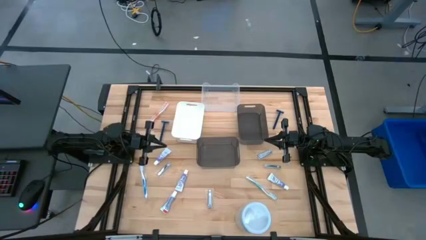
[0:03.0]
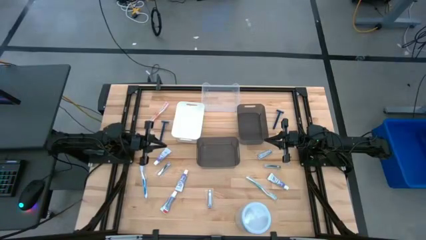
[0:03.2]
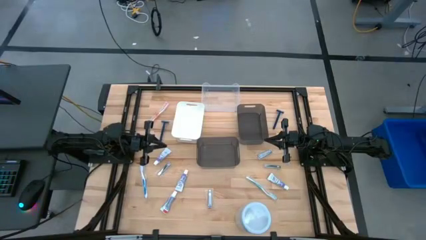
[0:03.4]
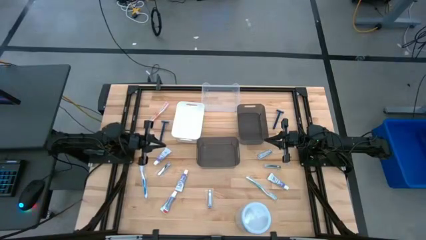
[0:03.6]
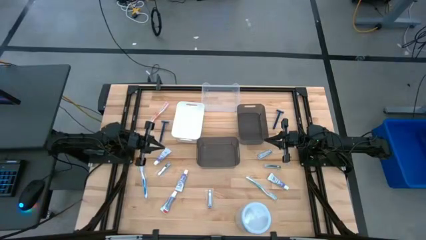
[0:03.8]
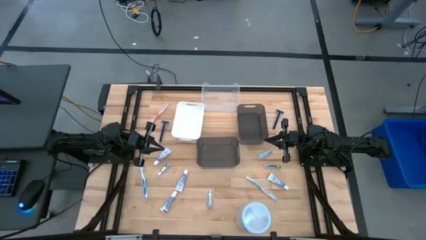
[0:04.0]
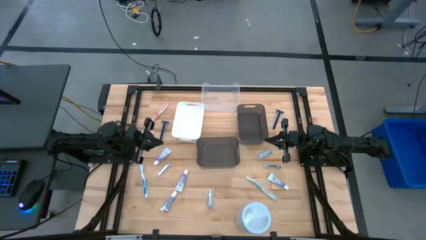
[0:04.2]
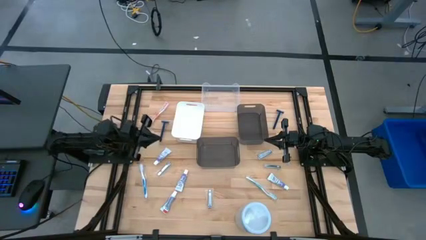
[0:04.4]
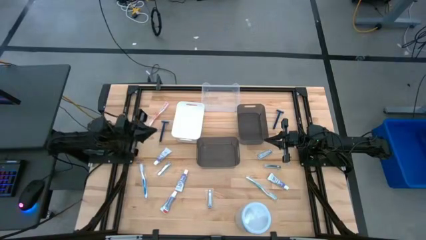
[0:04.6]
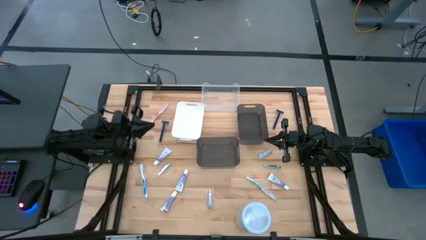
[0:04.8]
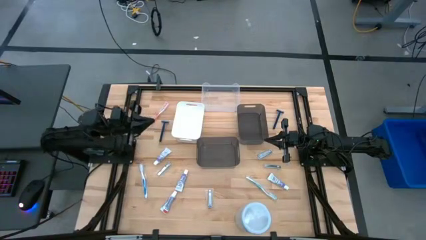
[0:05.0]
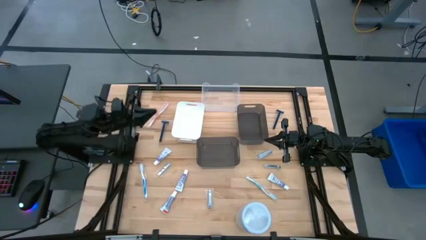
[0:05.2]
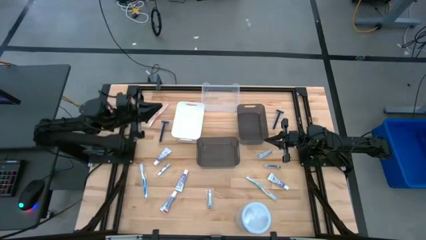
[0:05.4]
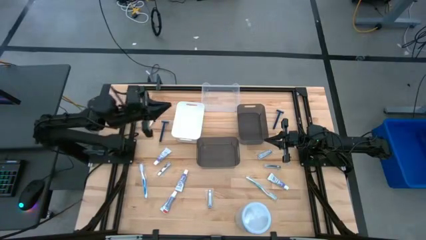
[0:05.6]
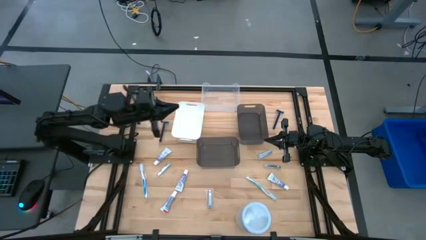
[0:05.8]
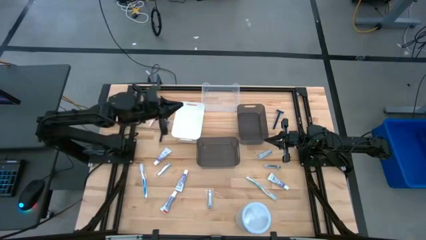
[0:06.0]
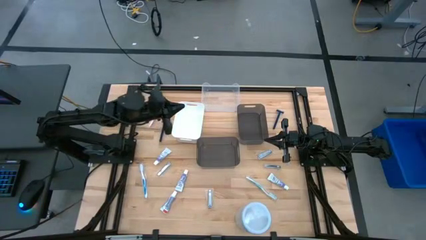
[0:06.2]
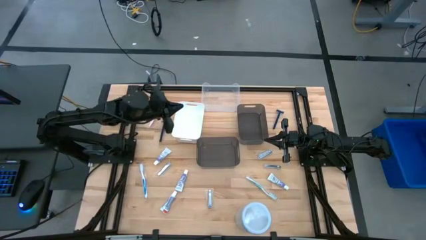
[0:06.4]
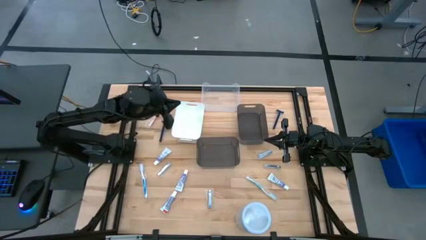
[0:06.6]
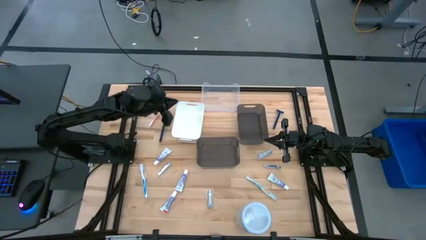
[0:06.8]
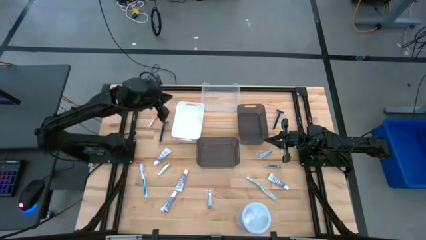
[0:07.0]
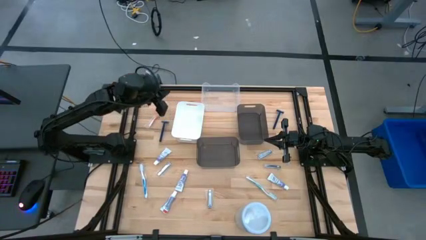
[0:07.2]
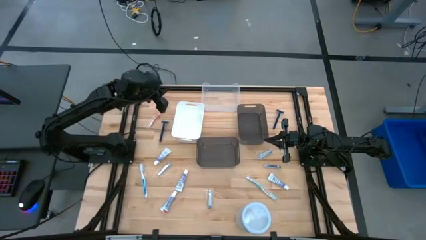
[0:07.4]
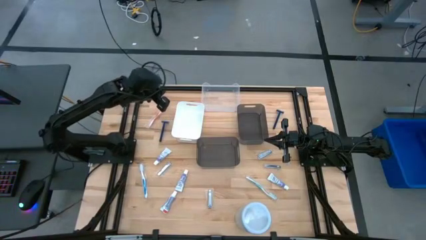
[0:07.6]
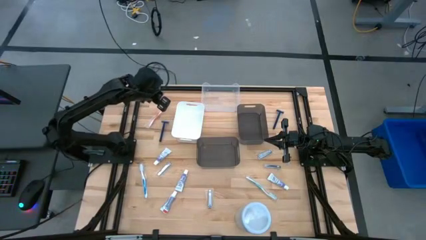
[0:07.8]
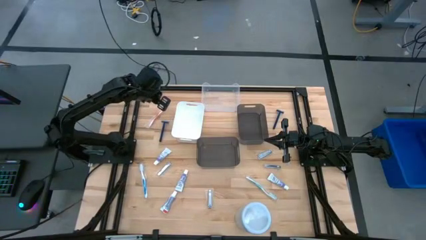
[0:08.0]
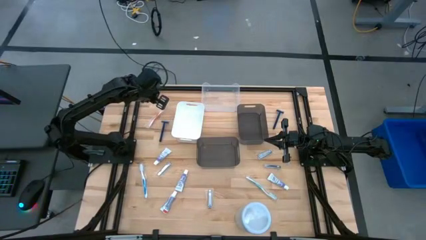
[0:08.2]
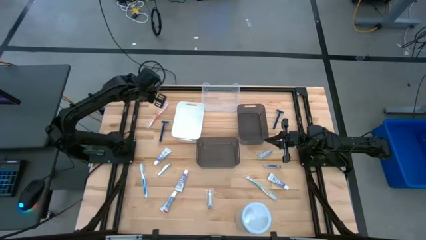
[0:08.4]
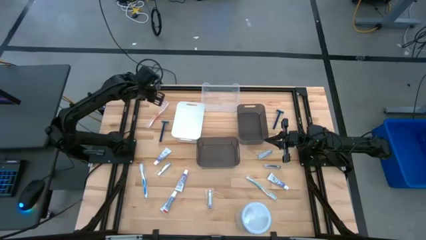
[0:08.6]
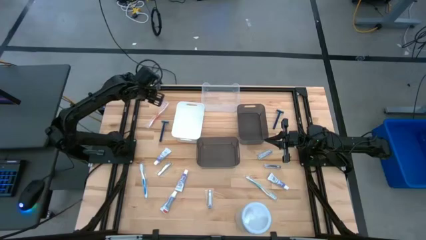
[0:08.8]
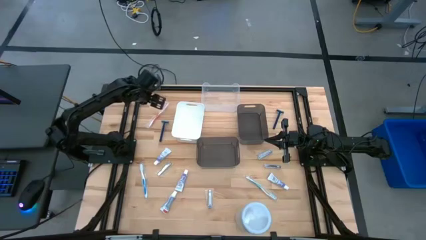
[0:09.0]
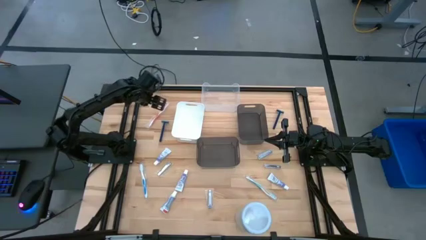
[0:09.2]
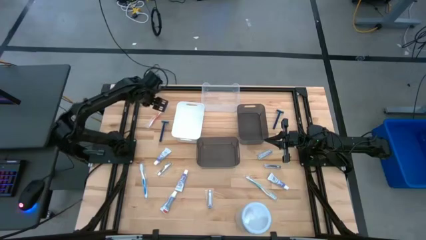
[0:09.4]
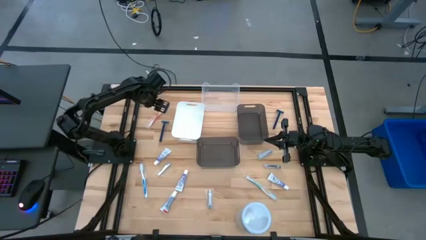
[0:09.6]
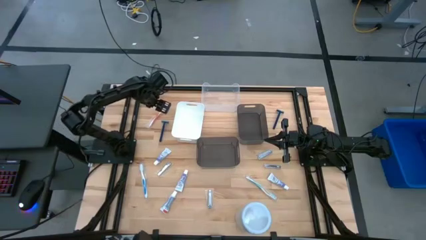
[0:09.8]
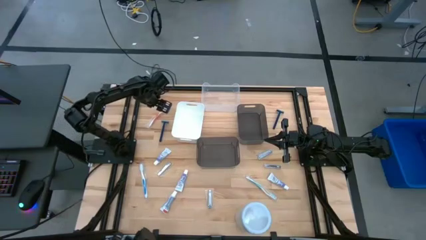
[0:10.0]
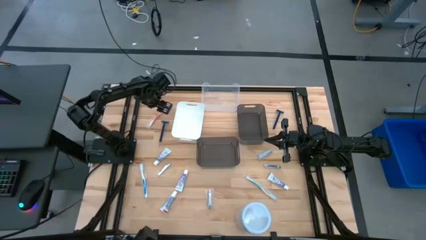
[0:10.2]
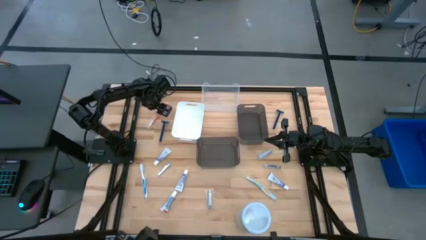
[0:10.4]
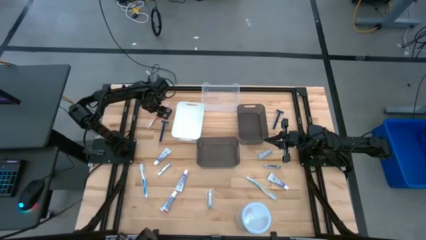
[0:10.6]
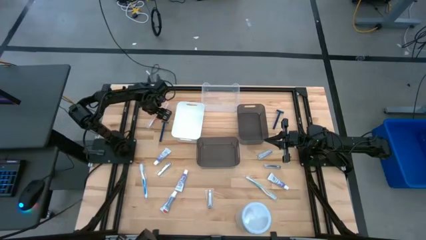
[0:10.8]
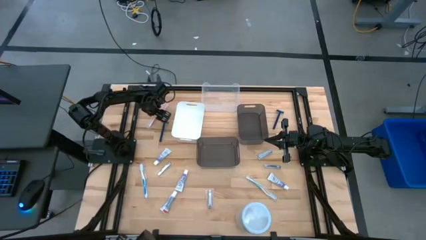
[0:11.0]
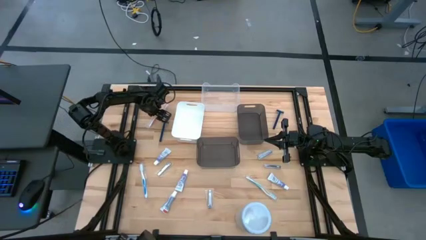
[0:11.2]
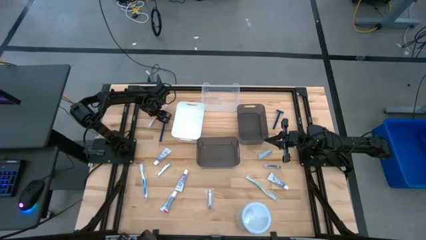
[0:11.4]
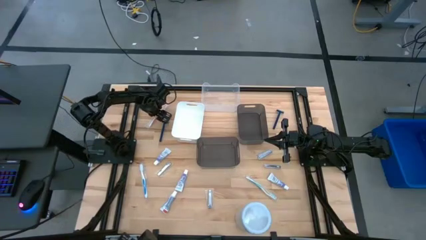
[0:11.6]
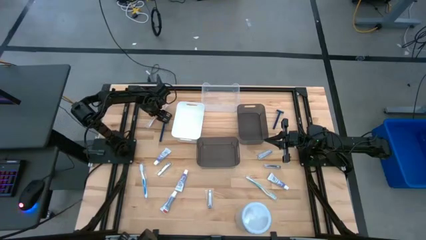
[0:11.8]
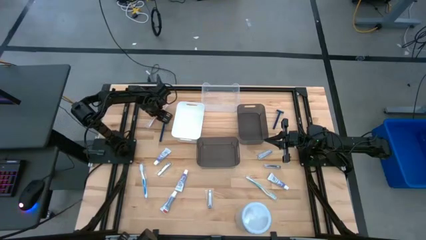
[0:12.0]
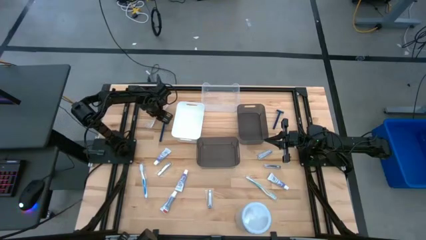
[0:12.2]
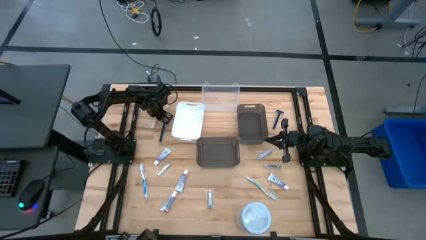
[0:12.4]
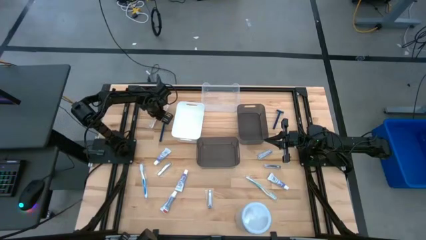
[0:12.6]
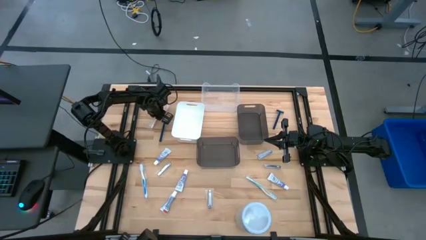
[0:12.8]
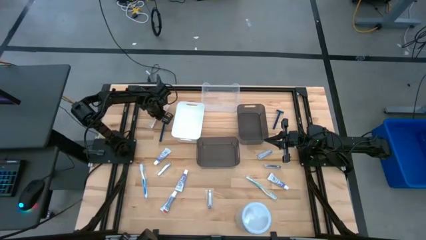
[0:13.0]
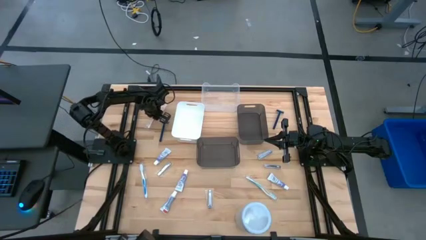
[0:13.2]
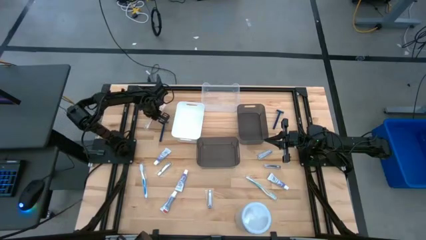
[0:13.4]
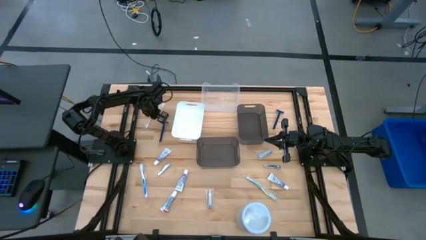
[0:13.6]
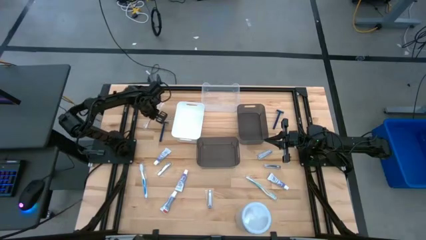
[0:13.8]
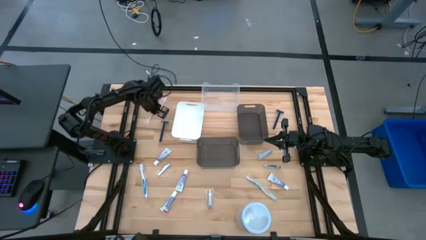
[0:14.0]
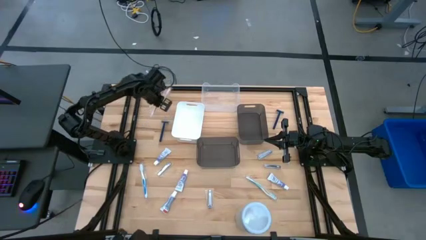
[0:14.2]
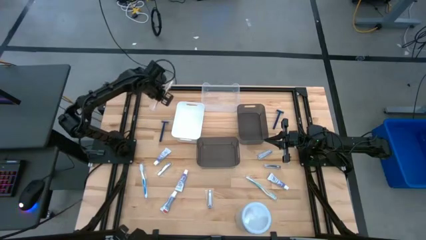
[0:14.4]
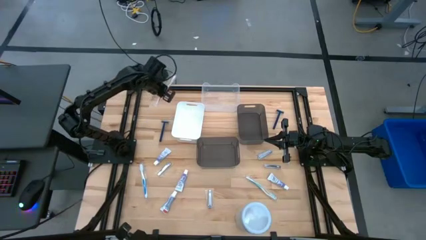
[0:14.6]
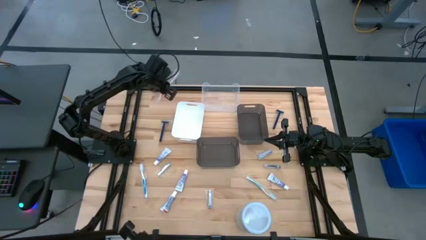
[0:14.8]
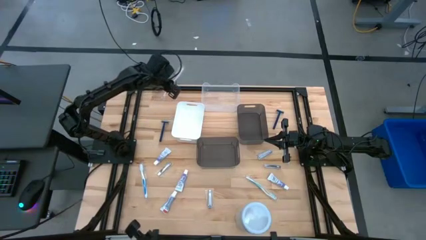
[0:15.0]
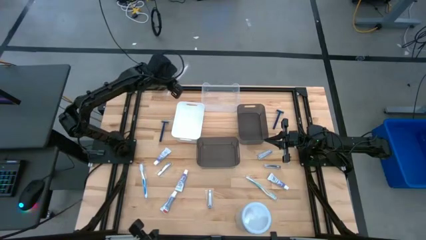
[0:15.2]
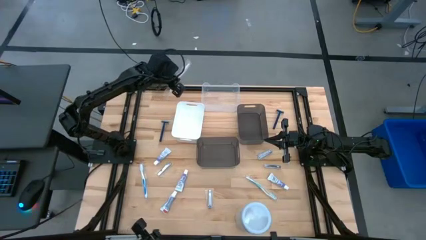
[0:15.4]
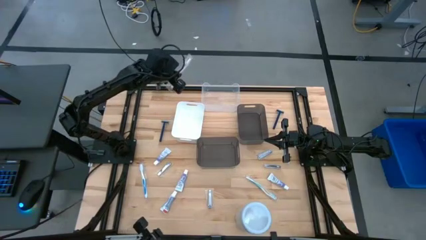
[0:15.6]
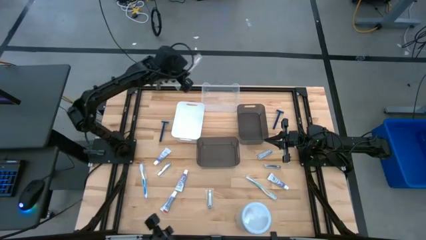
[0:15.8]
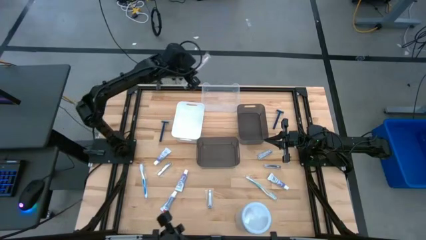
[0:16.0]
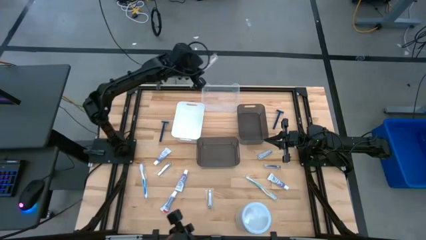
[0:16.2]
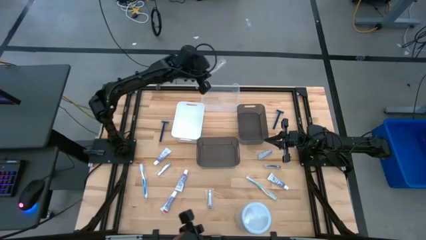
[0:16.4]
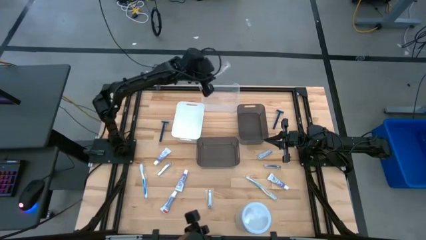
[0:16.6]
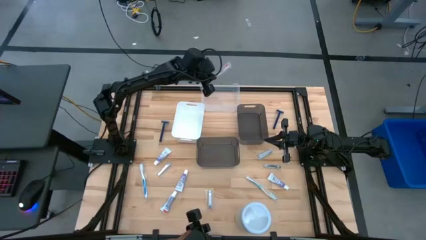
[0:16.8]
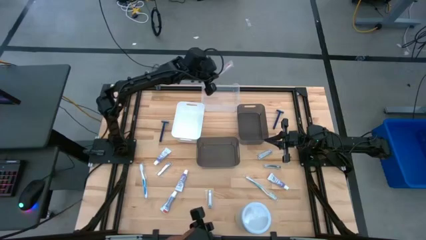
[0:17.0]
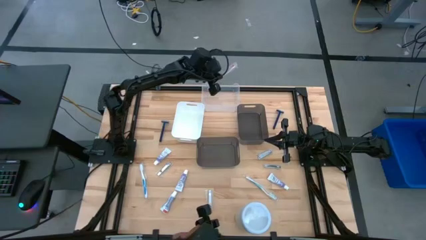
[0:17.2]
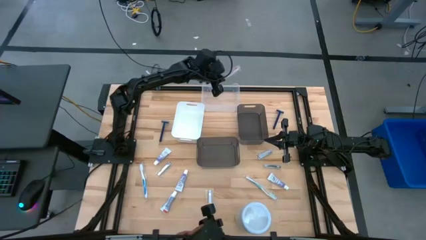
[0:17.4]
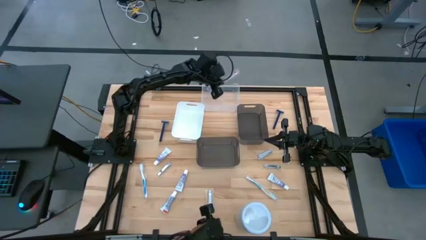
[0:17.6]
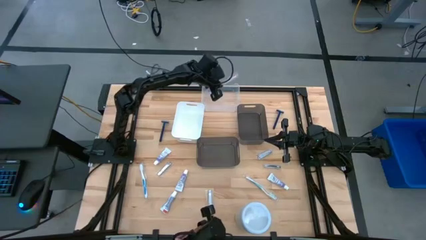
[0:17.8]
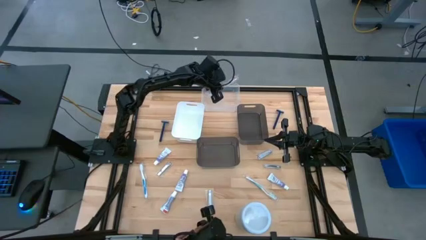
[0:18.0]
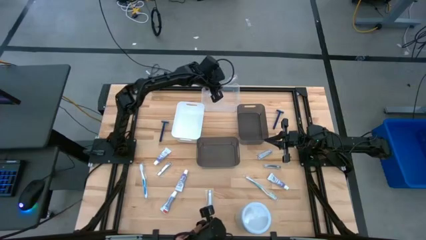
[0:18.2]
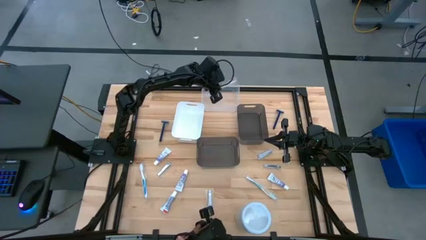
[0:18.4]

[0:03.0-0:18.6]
Task: Pick & Place Travel size toiletries
Put the orange toothbrush into the transparent bin
